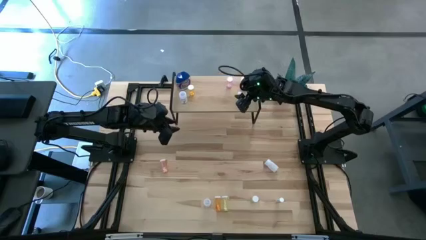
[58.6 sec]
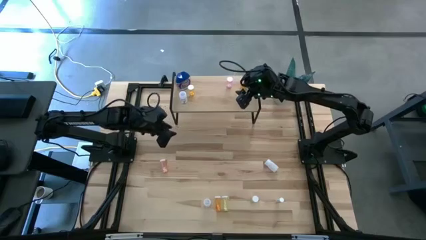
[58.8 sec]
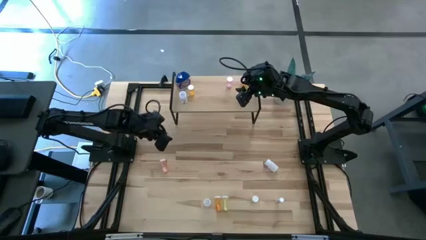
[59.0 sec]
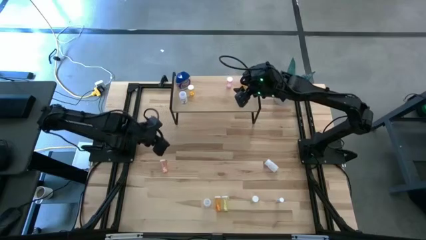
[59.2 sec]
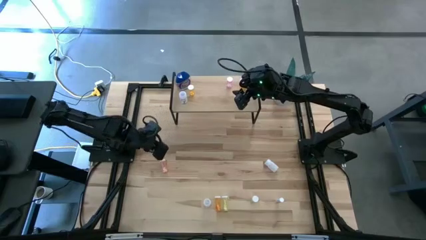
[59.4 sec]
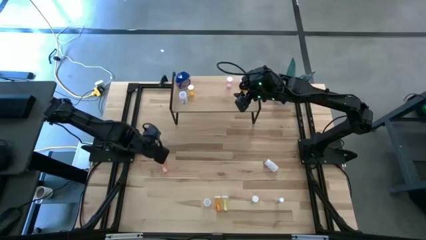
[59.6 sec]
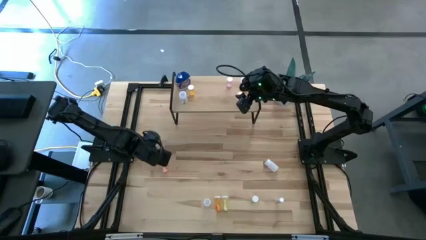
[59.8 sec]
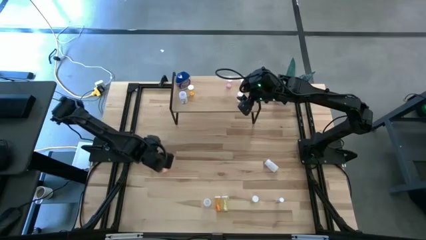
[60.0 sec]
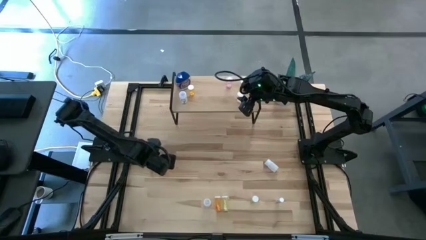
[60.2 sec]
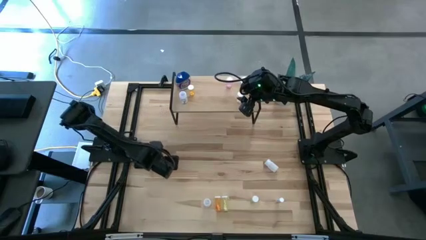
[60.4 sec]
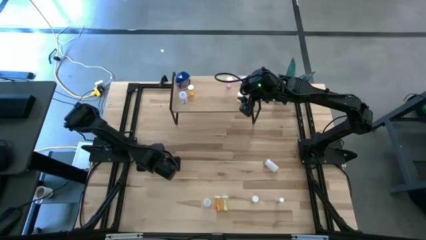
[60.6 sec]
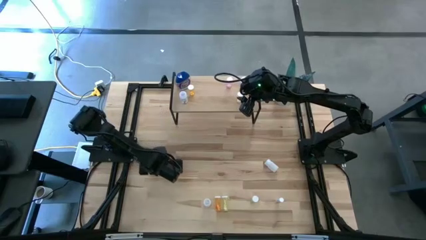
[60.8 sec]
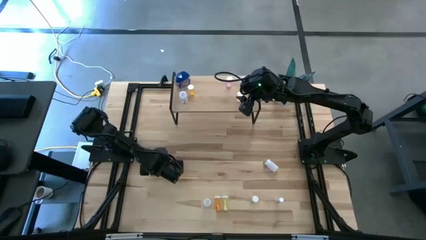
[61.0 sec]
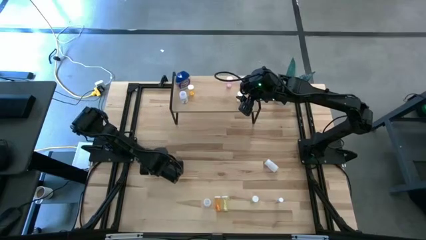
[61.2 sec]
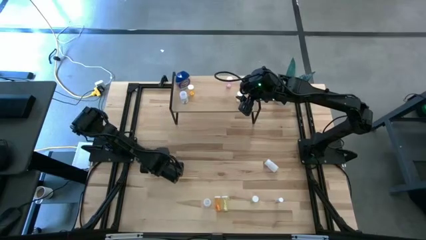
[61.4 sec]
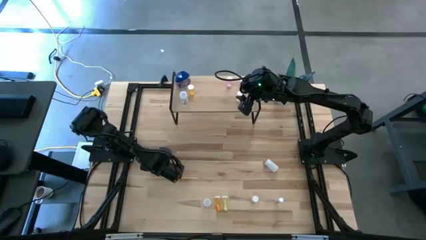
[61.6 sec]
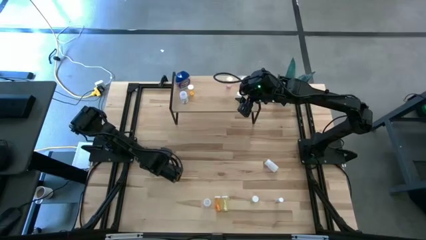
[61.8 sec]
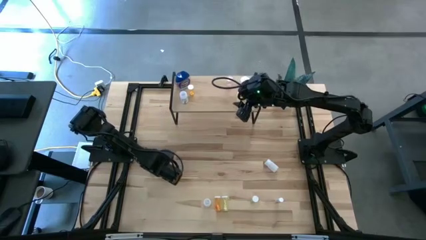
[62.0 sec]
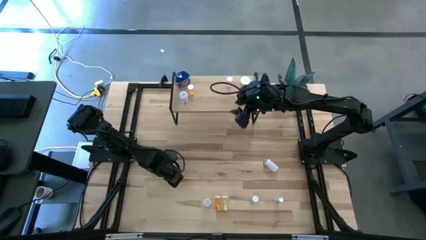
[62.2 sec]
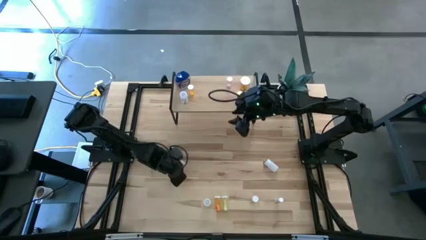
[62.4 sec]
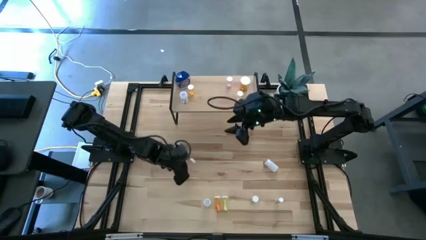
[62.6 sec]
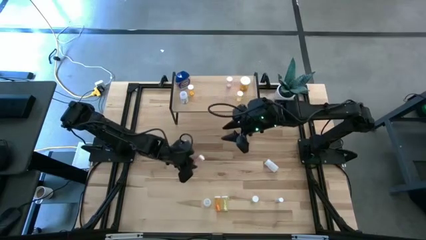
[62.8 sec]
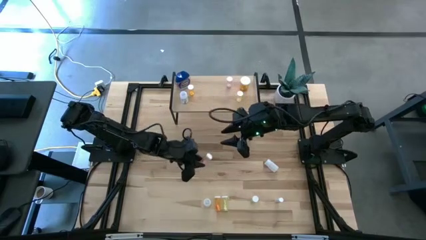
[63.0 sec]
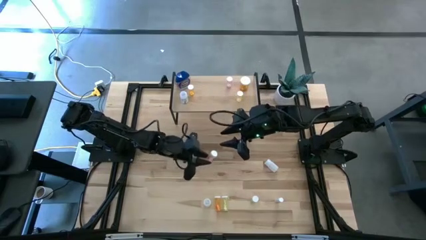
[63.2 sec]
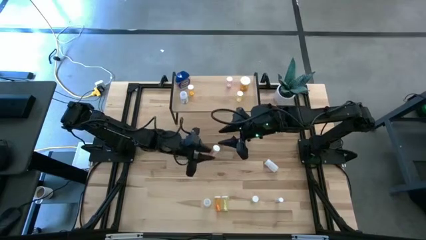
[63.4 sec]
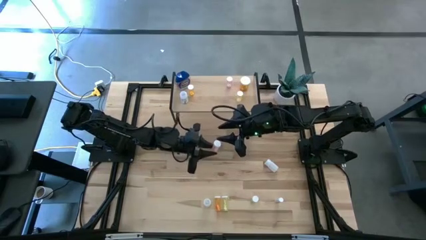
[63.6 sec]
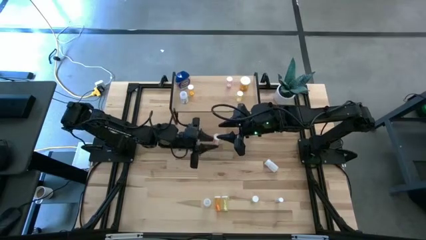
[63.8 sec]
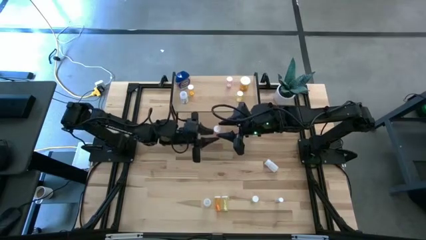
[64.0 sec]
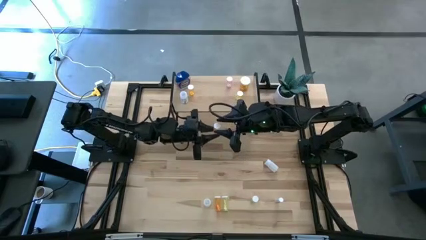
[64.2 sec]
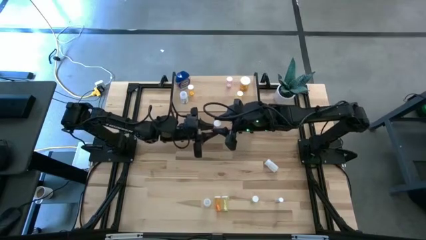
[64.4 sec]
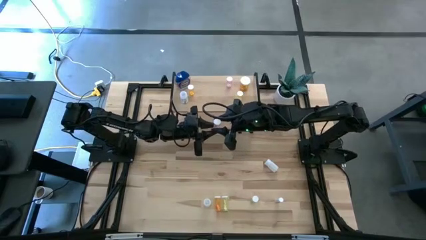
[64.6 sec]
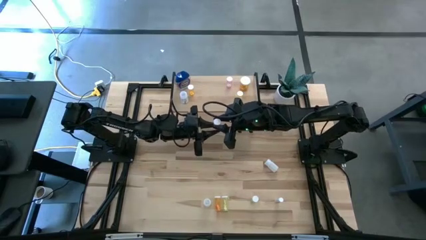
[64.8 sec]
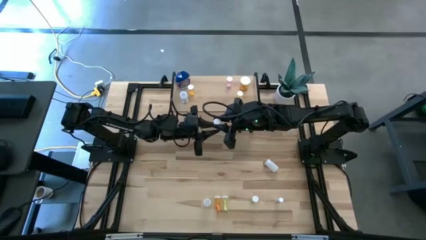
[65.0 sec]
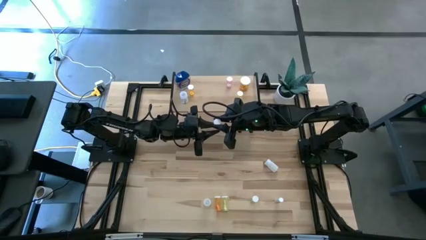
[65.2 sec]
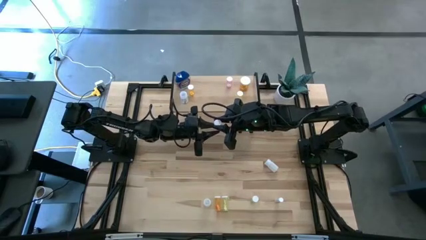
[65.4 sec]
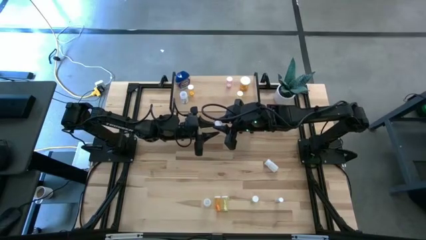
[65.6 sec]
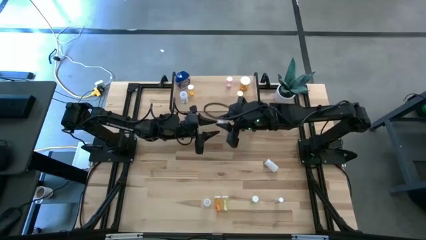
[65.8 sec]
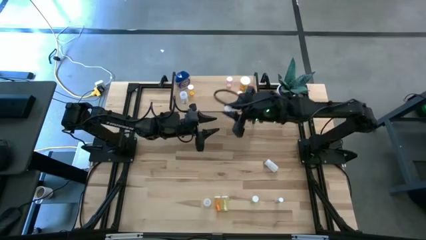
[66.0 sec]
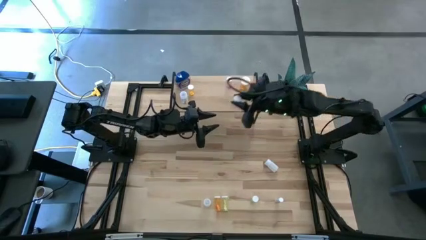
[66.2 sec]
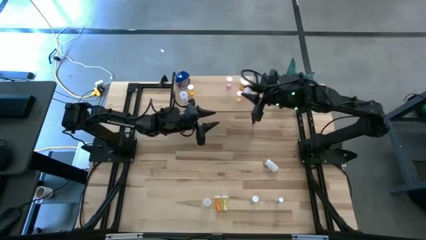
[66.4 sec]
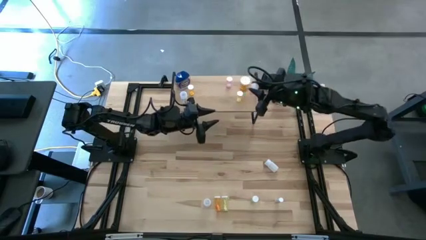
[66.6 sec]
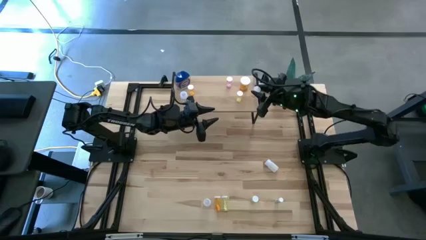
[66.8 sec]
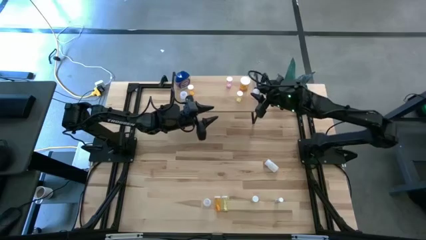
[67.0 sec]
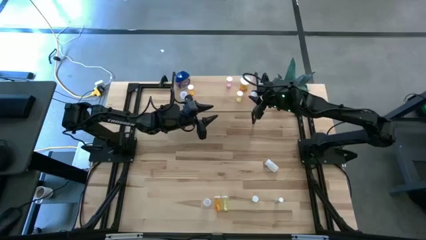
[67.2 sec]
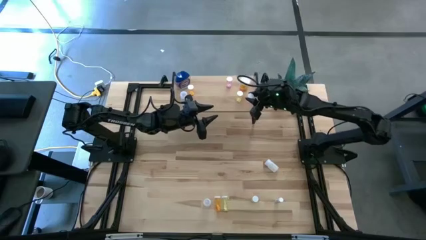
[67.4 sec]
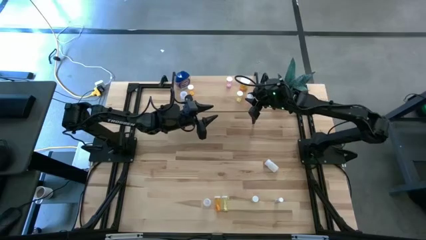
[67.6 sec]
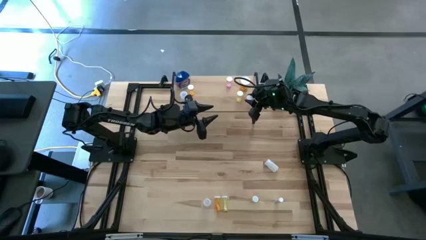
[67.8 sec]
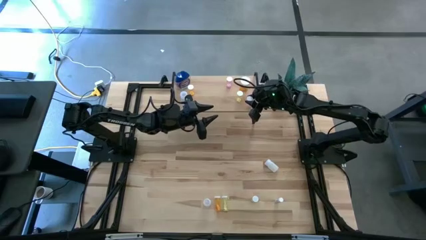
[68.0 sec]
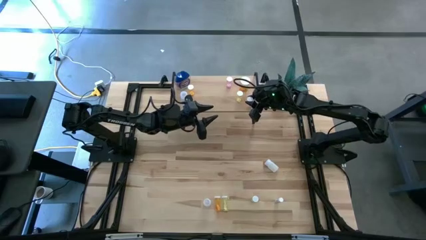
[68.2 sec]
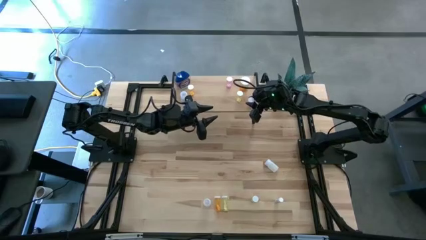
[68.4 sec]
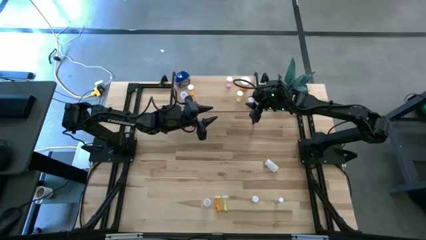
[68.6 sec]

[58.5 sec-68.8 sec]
Task: Pick and place medicine bottles onto shelf by color
Put the pink pill bottle on the shelf

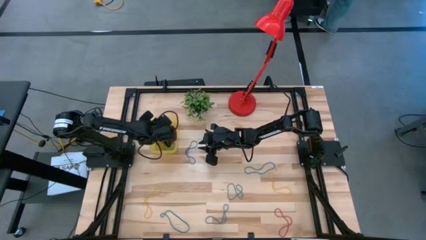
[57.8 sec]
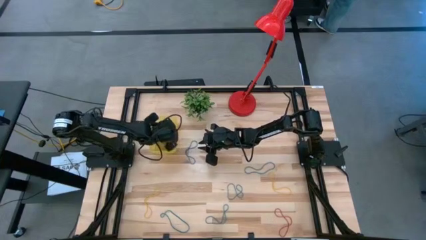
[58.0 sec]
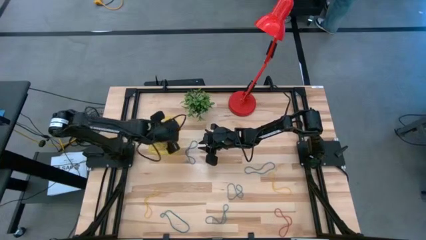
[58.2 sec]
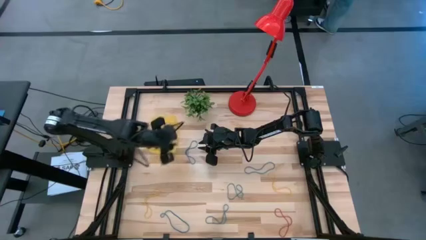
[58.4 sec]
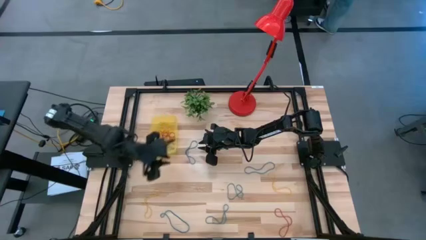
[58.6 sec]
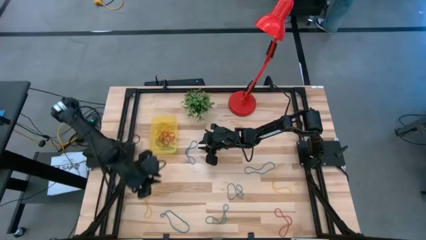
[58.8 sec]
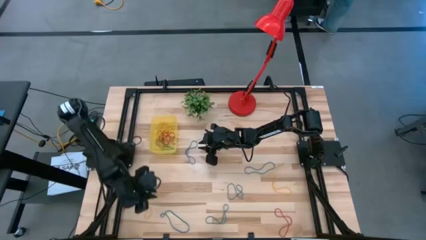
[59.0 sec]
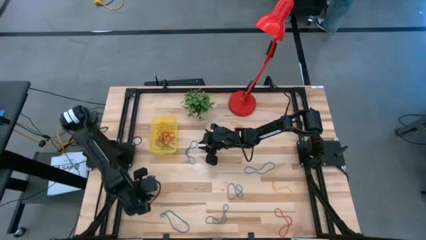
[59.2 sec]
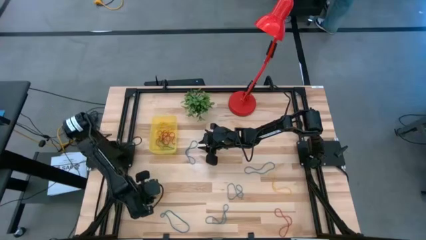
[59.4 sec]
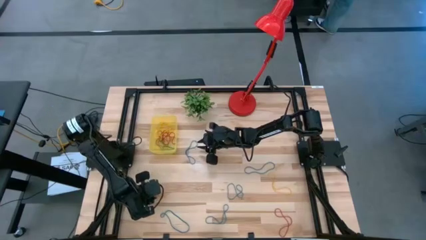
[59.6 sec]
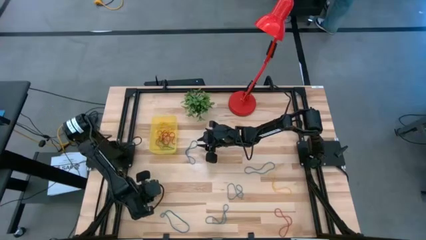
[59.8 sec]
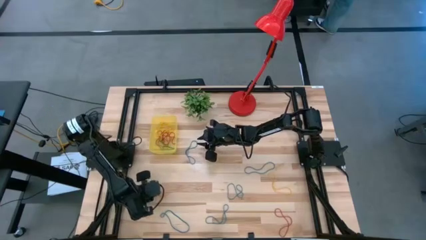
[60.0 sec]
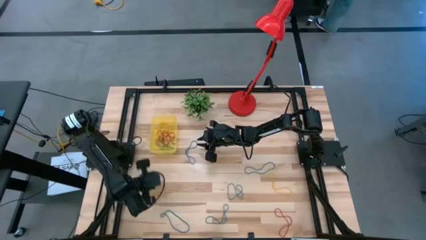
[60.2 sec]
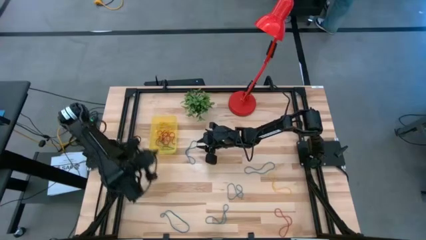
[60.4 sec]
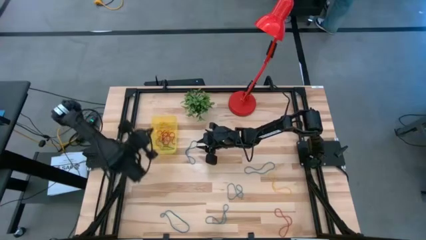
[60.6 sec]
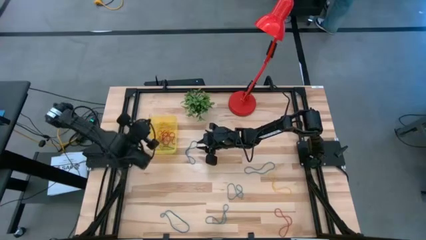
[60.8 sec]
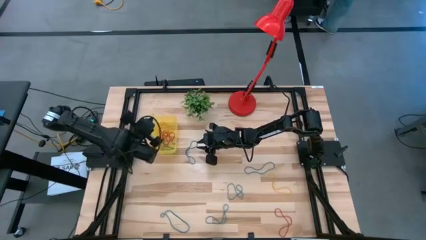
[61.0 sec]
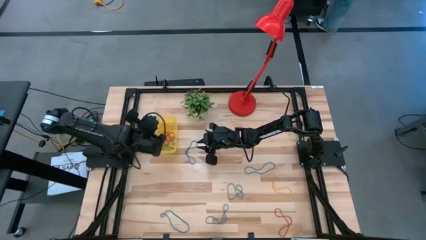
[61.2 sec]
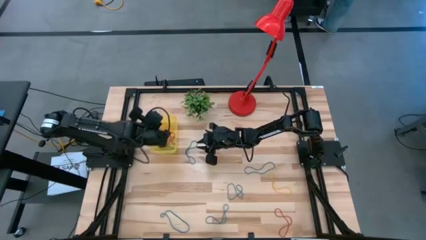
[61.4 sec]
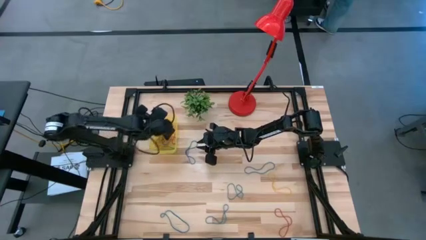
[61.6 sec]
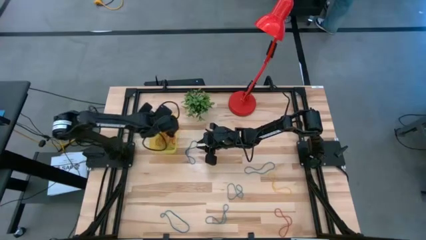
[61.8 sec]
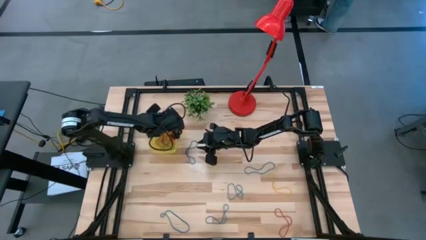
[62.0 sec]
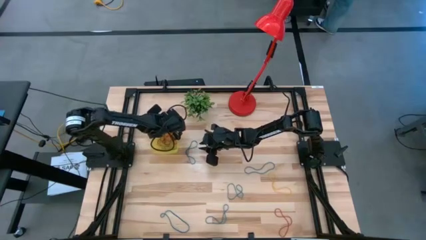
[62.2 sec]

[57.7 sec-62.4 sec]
Task: Pick and place items into bin
Put the yellow rubber band into the yellow bin
